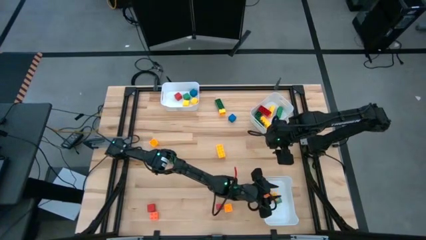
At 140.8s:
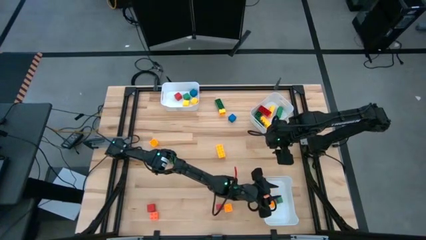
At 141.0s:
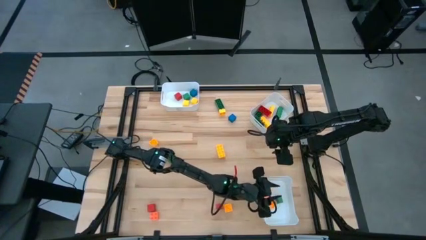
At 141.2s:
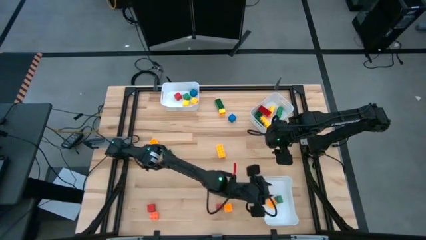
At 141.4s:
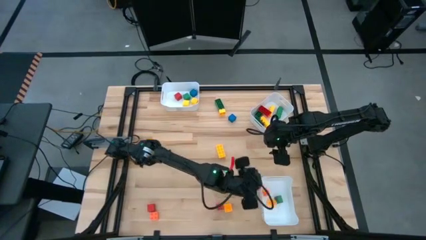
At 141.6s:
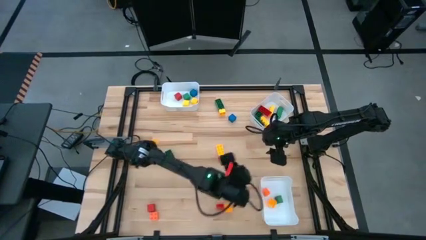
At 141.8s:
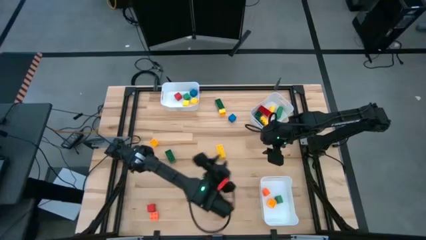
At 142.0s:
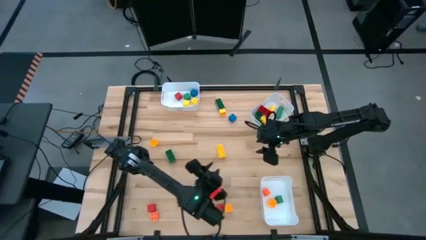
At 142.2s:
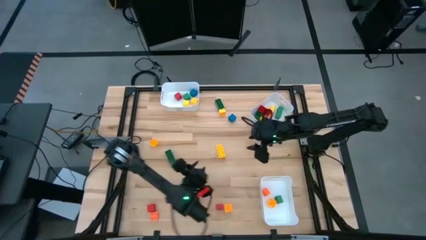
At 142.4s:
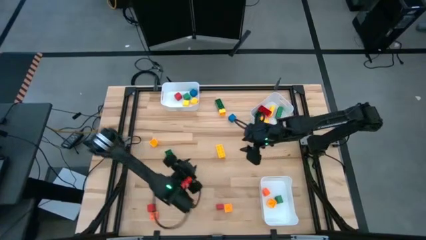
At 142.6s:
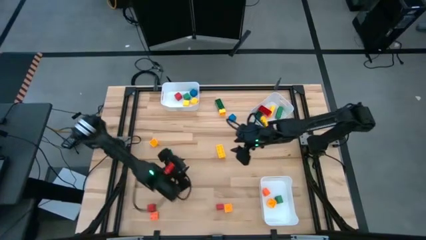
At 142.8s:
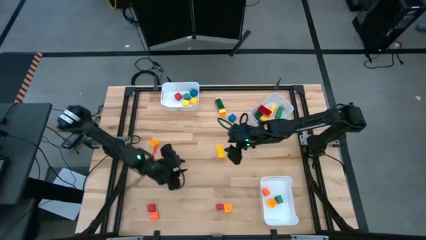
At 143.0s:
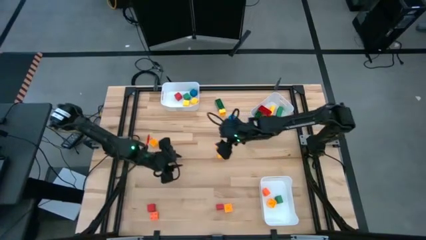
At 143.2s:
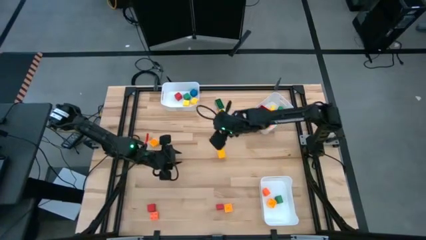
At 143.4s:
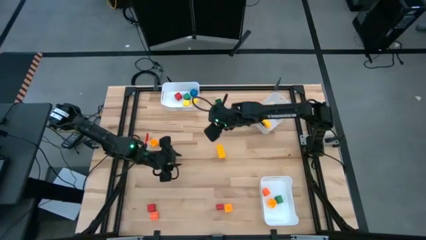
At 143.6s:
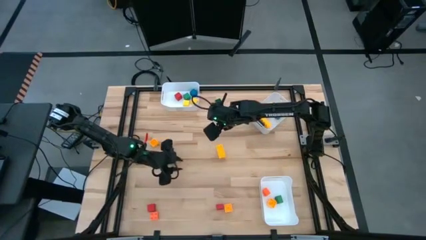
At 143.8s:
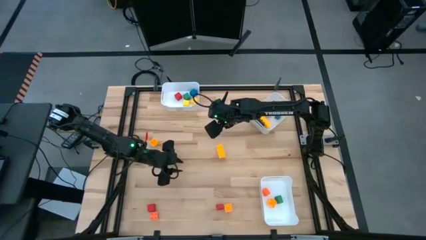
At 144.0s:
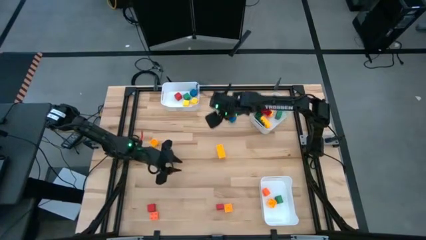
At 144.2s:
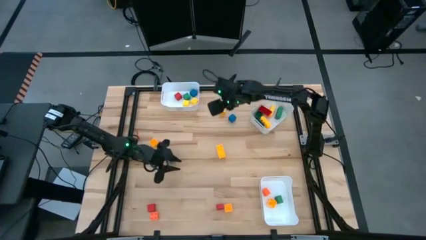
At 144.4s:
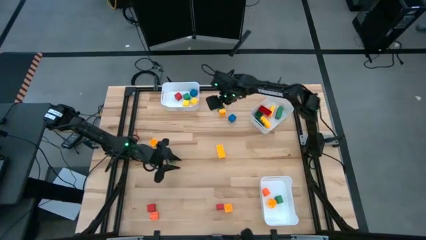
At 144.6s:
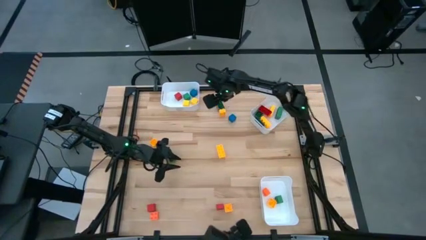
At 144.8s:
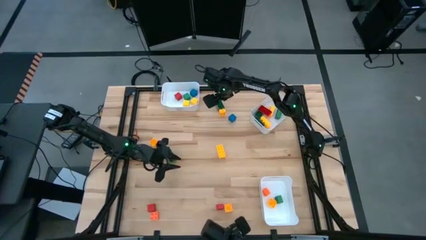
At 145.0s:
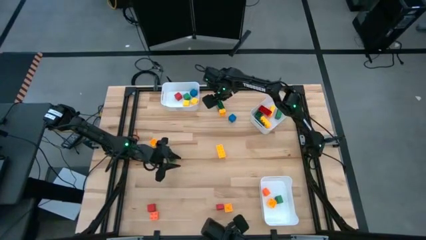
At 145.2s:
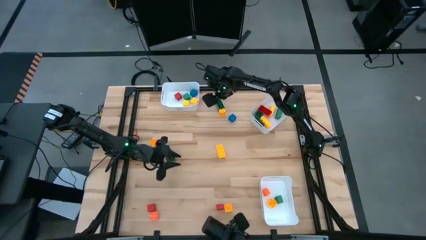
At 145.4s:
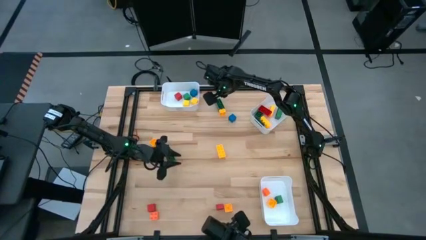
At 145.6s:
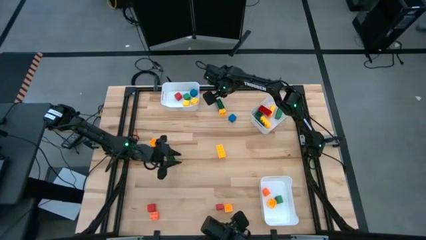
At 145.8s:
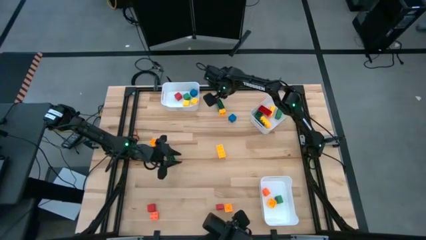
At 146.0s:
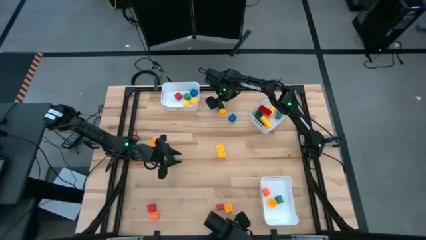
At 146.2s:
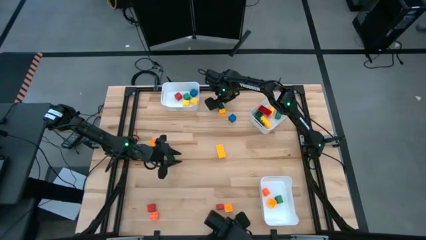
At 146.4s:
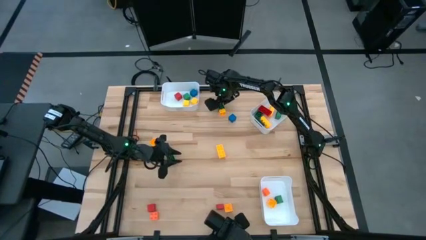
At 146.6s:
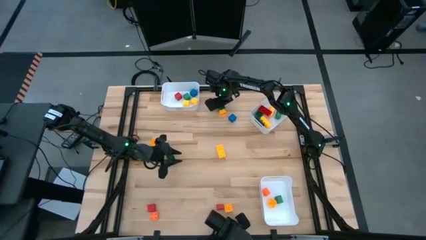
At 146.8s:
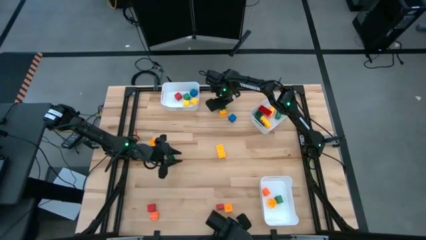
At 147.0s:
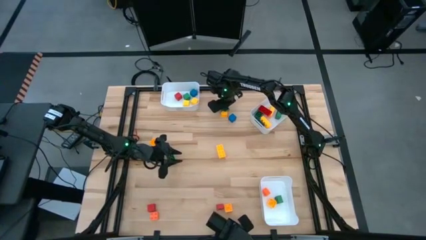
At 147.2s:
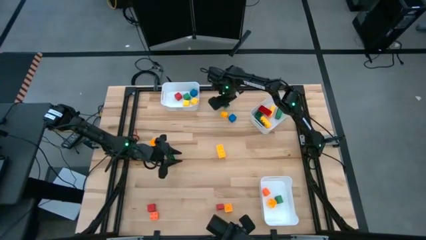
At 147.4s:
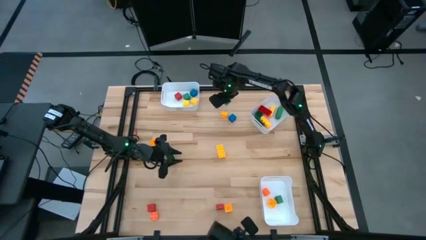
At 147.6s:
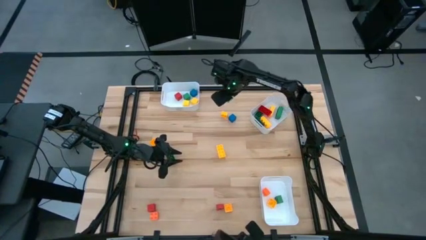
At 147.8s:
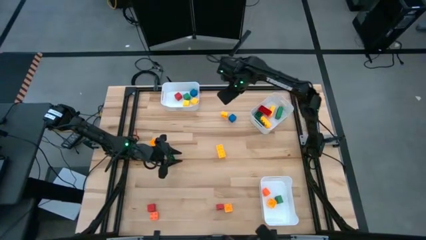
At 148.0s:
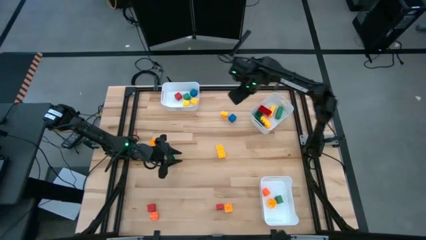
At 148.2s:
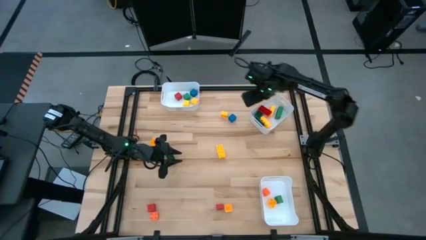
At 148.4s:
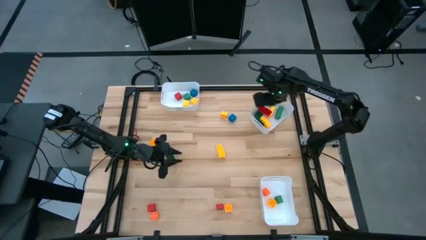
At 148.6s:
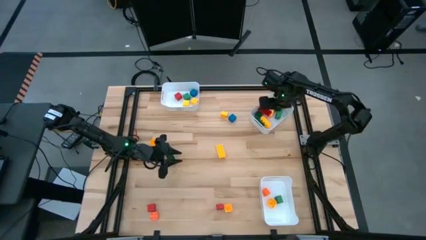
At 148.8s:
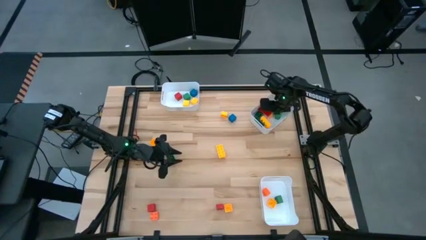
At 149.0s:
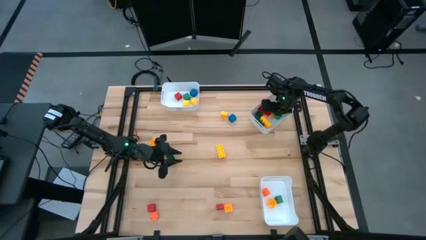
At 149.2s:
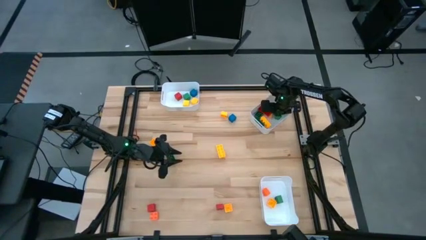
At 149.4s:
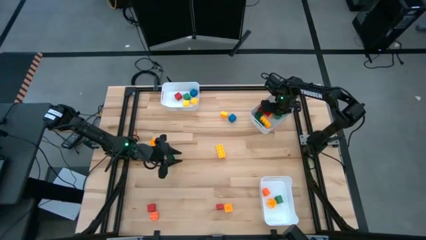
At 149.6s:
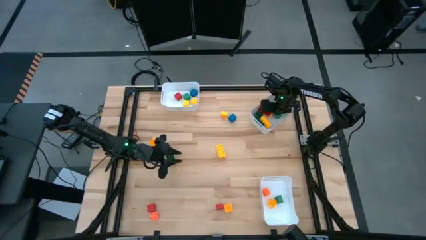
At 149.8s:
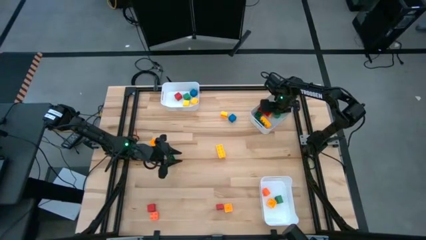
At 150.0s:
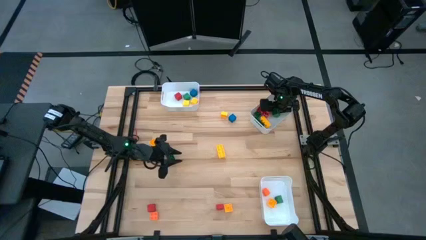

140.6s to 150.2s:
Task: Sort blocks by size
Put the green 8 stud gamepiece into the top right white bin

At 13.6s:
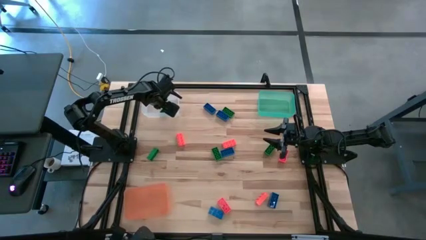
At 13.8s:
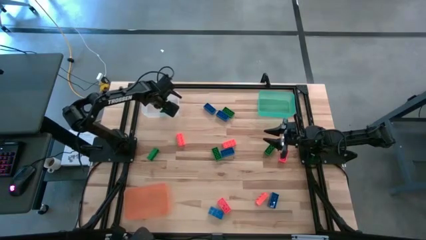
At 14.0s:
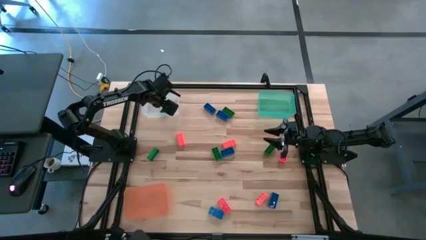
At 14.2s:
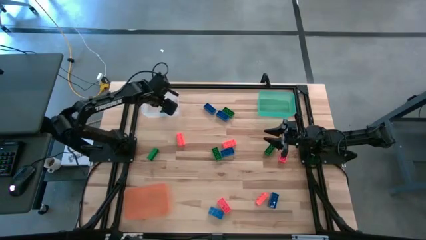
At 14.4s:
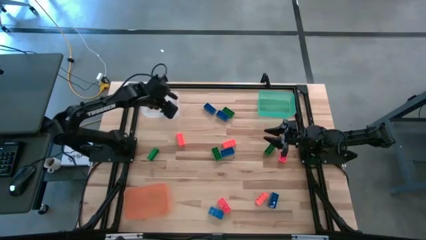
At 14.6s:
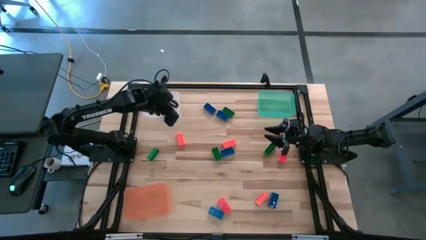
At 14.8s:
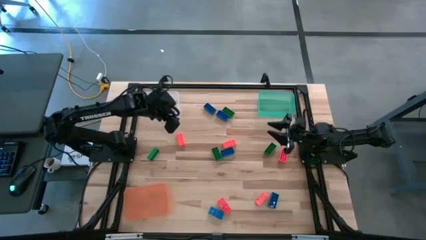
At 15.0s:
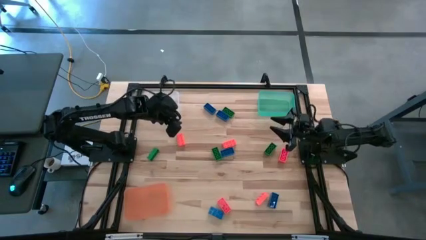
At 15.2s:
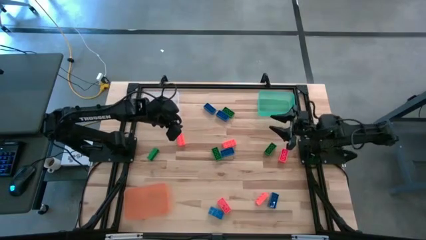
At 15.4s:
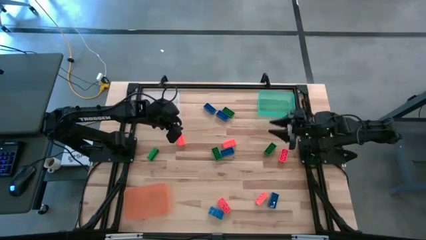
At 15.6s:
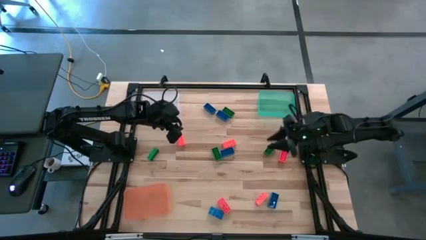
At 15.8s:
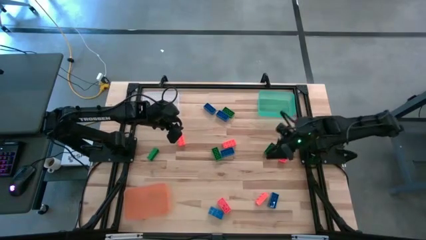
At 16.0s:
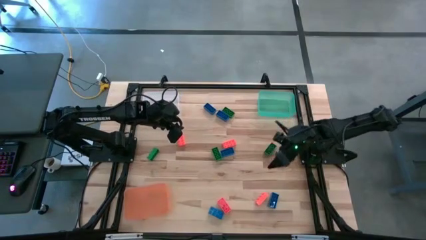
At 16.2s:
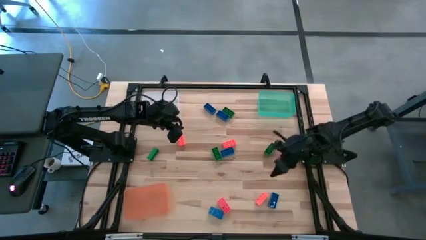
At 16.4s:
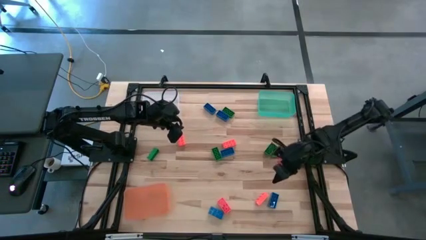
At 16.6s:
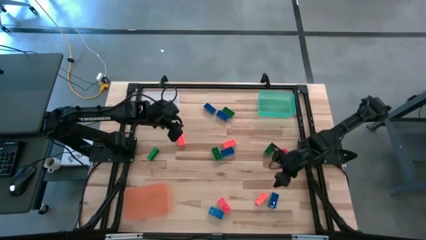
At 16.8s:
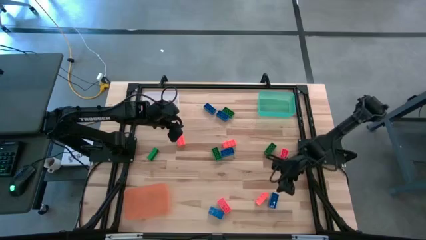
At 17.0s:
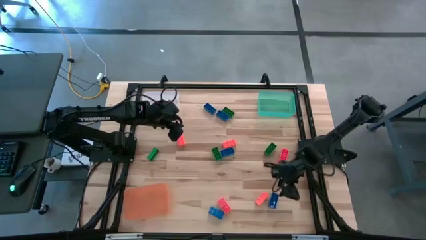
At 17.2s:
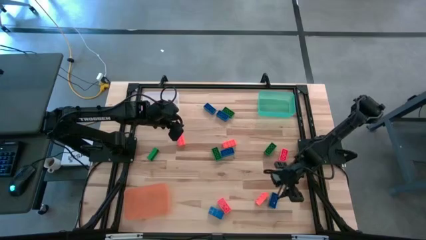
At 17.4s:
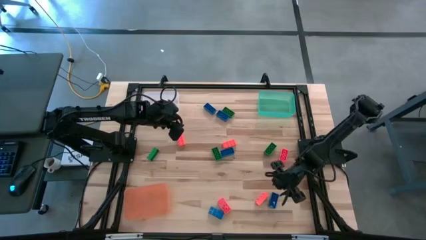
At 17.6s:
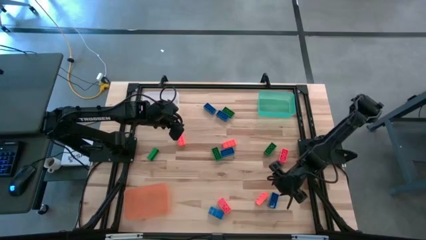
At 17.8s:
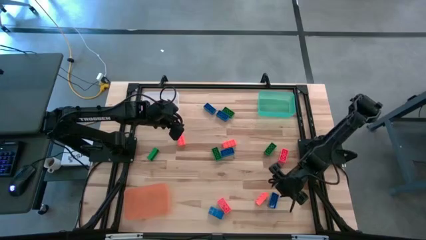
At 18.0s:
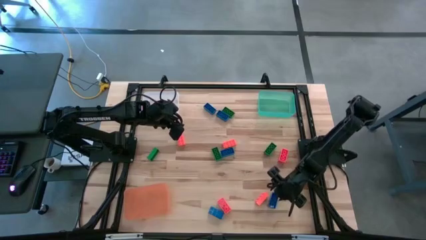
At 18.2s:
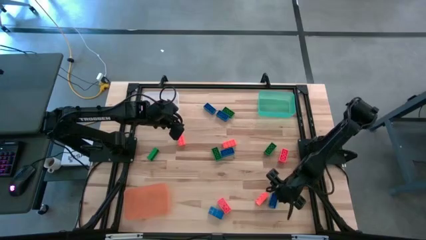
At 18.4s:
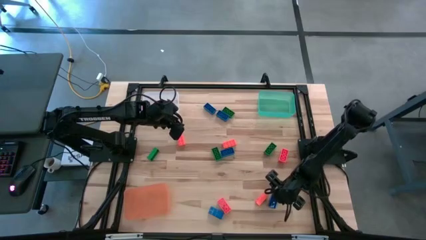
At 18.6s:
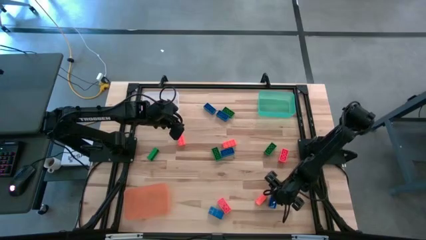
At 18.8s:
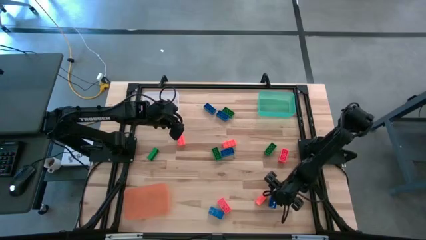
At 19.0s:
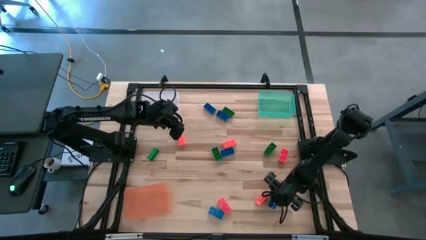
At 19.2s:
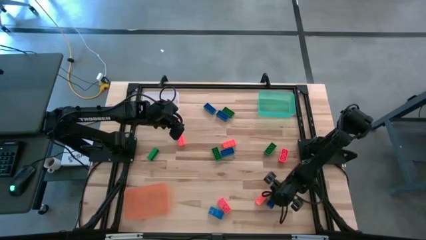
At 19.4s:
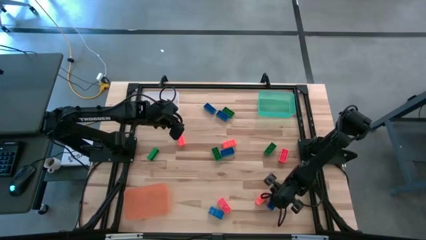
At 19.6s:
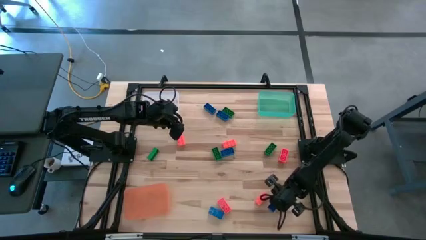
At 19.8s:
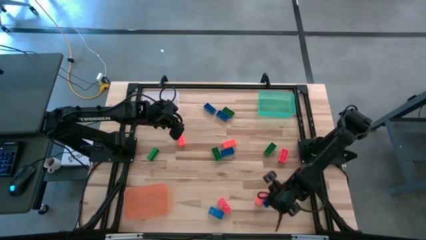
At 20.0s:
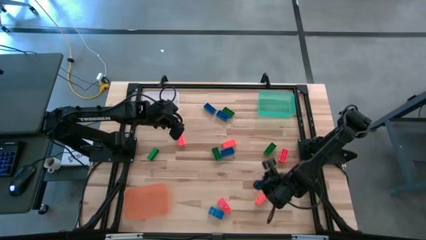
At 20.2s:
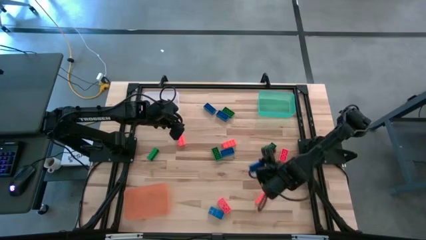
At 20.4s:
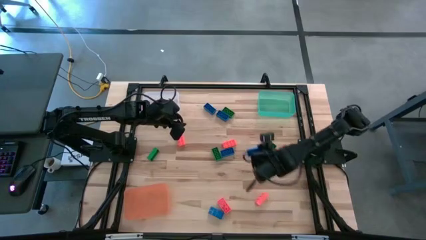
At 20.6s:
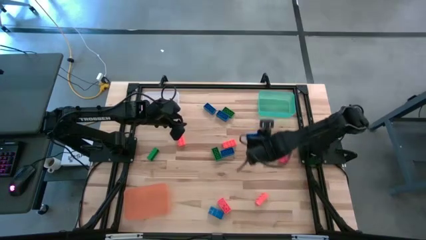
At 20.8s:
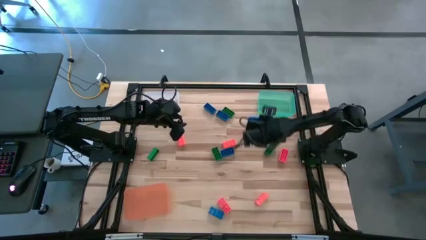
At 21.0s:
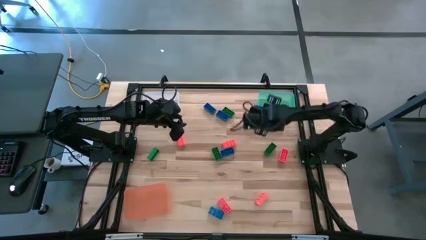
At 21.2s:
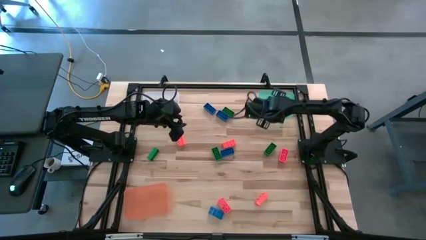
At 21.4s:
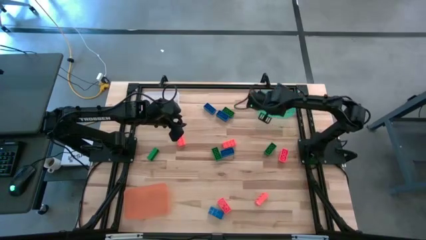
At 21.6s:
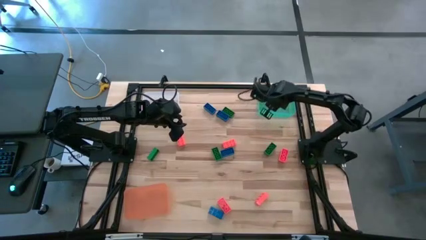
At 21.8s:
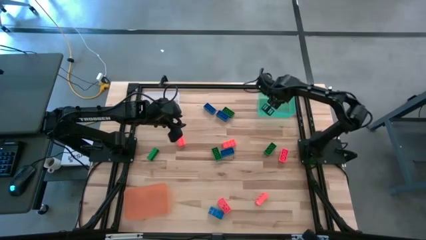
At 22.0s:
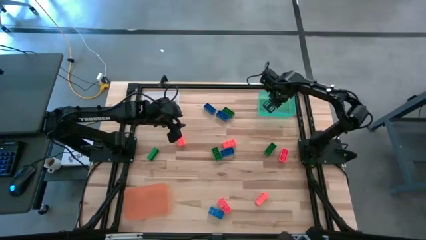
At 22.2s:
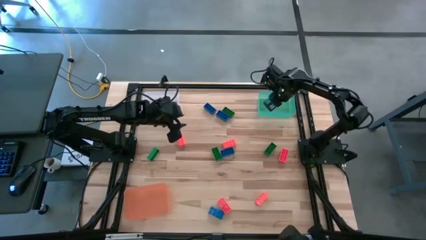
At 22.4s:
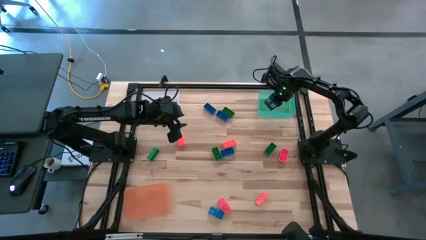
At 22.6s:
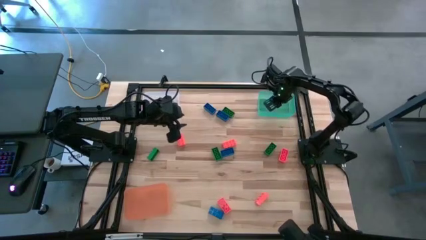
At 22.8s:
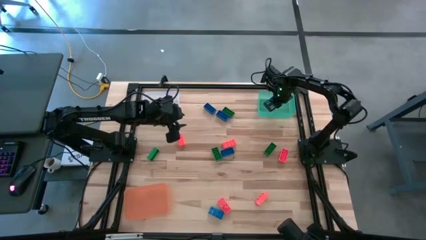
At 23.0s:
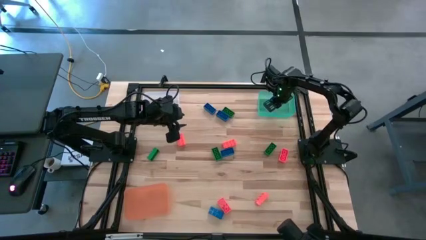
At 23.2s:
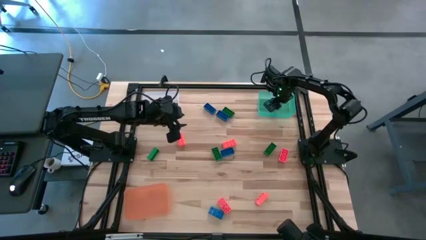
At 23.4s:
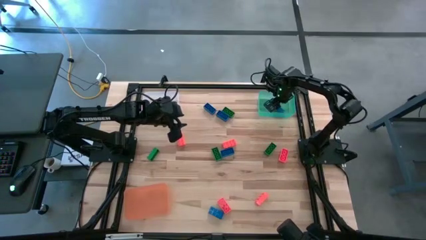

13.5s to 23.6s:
Task: Sort & place blocks by color
Put the blue game piece into the green bin
